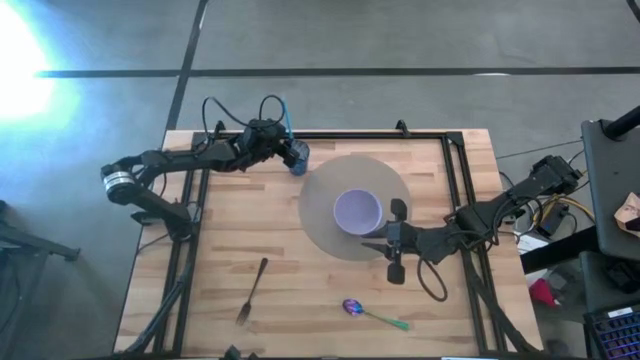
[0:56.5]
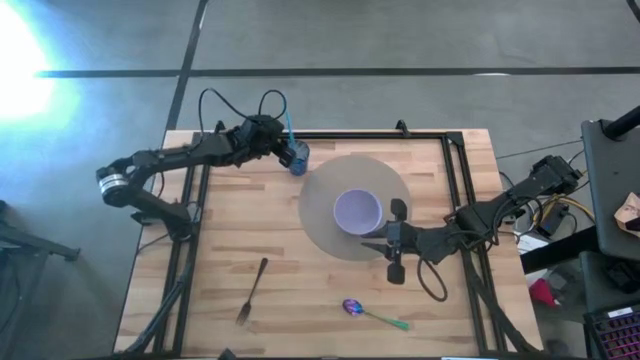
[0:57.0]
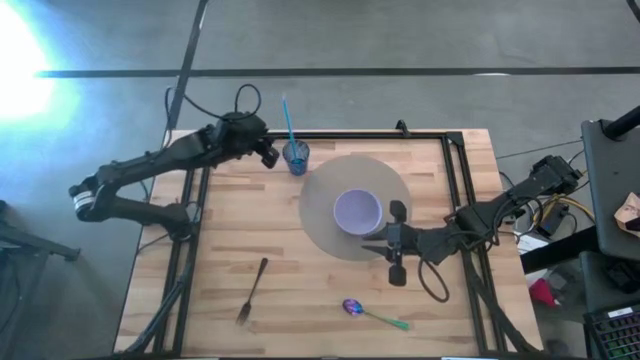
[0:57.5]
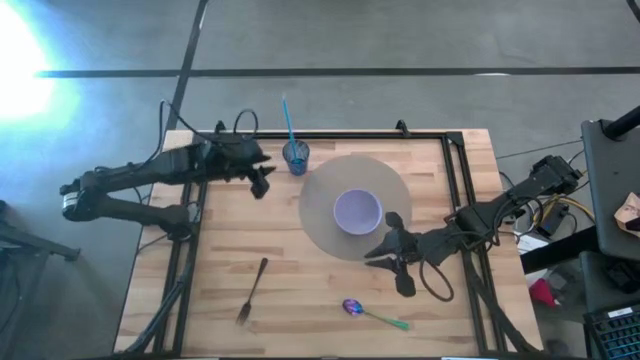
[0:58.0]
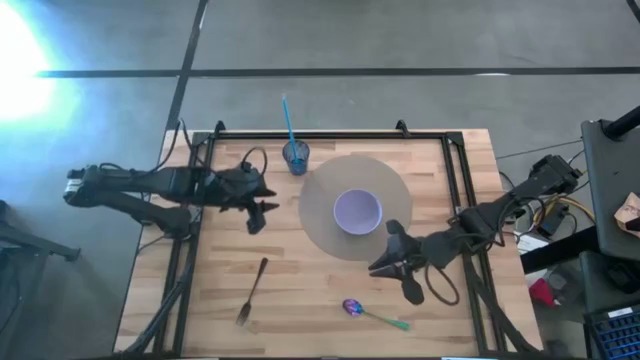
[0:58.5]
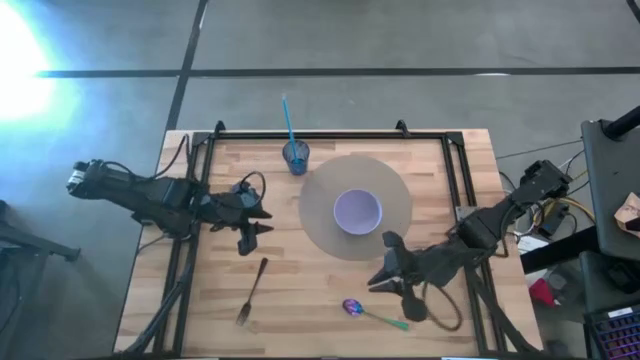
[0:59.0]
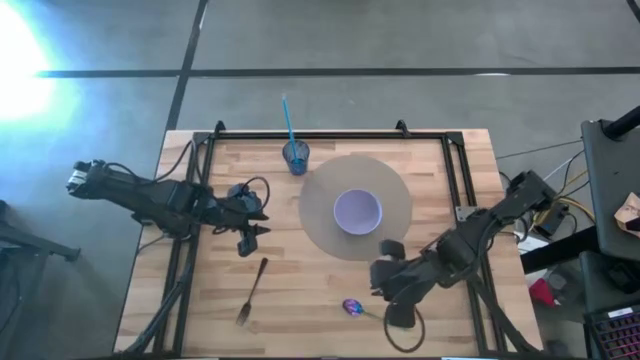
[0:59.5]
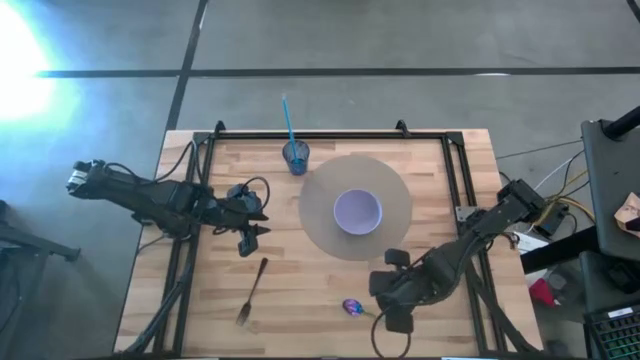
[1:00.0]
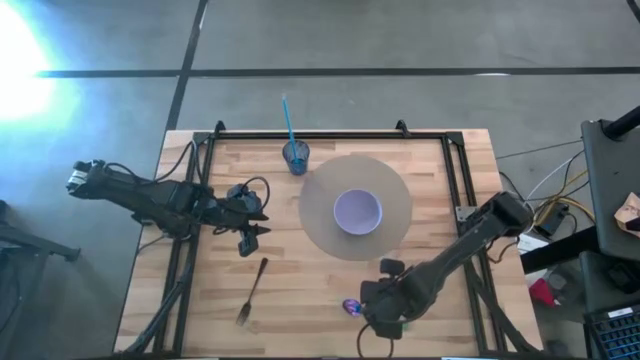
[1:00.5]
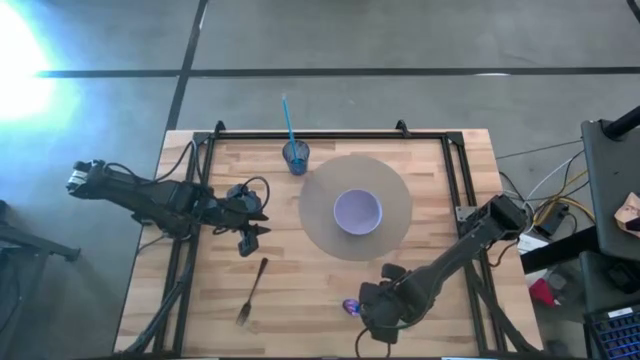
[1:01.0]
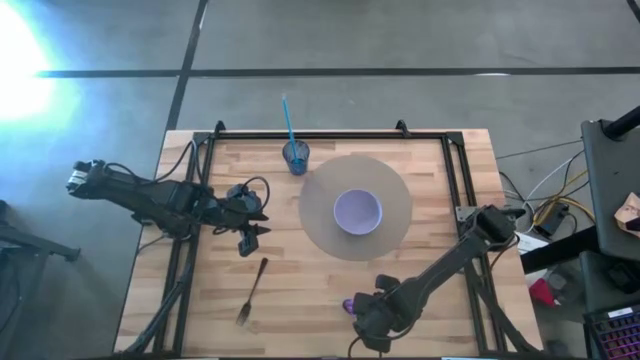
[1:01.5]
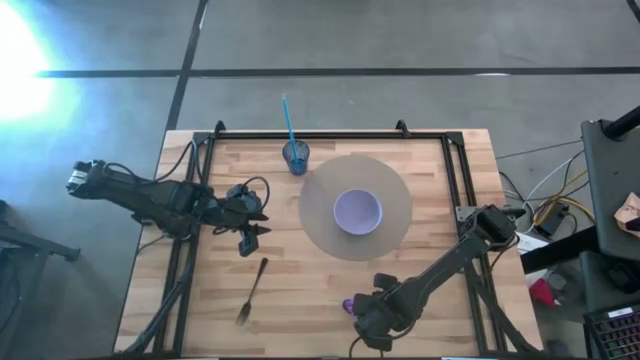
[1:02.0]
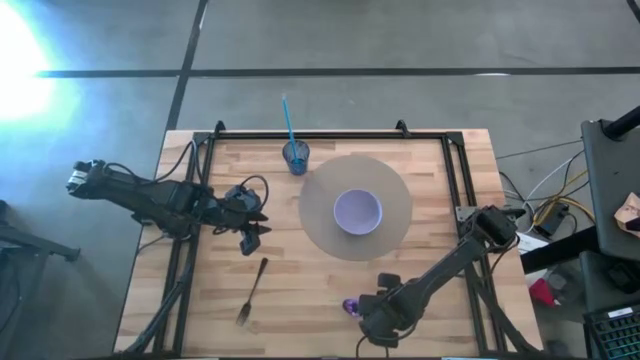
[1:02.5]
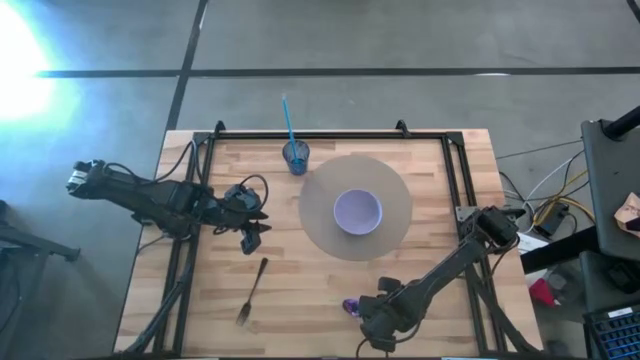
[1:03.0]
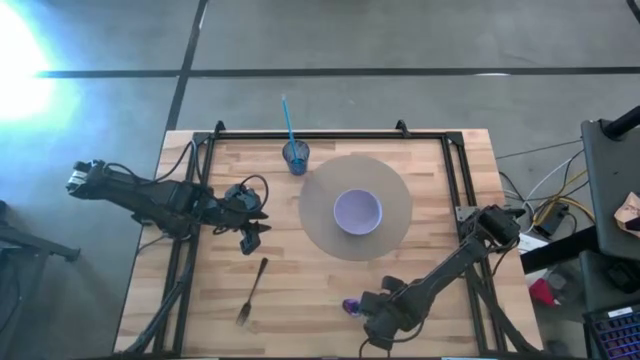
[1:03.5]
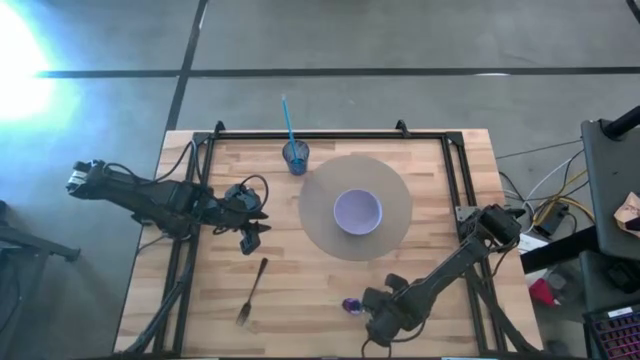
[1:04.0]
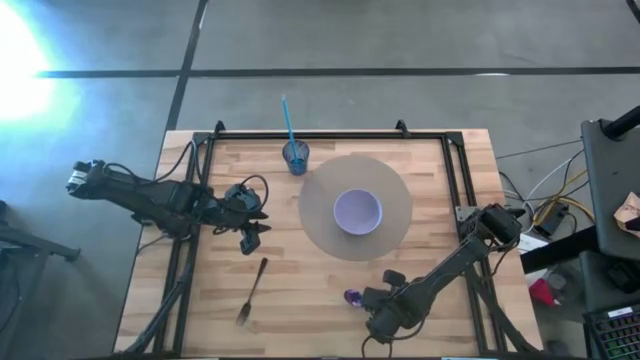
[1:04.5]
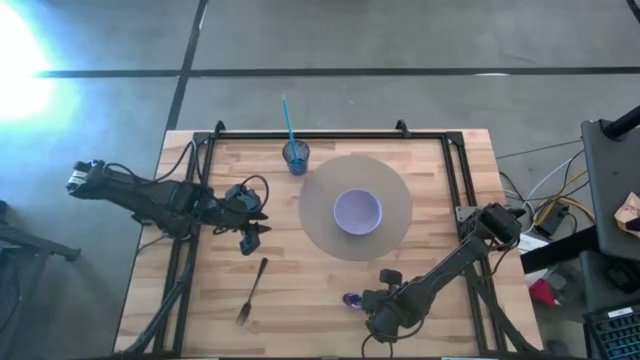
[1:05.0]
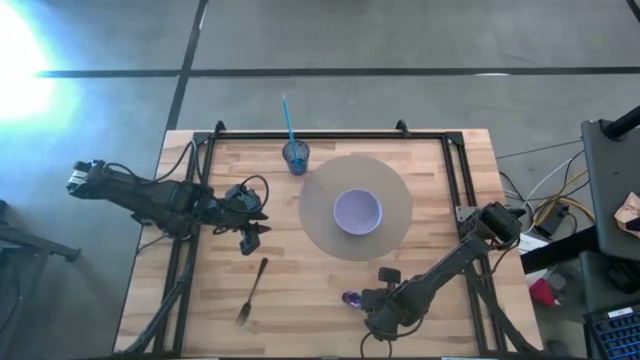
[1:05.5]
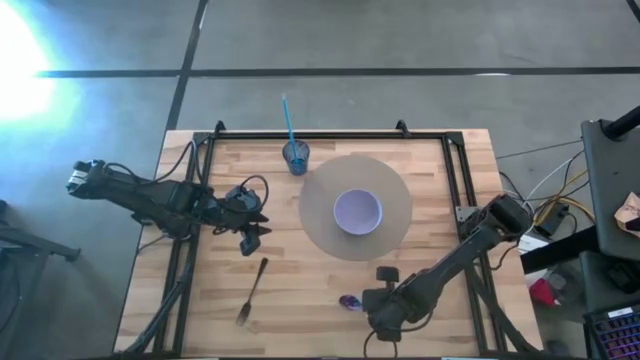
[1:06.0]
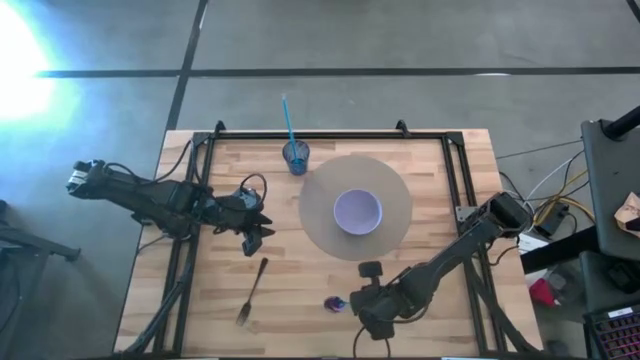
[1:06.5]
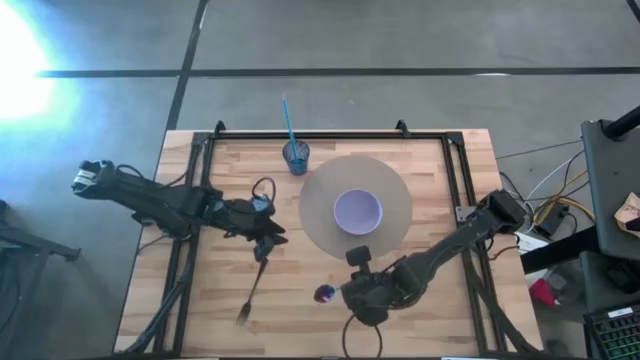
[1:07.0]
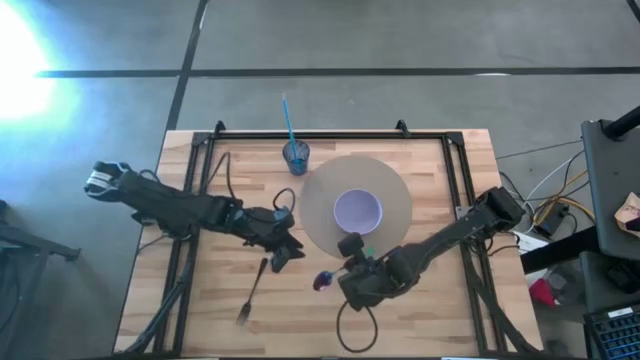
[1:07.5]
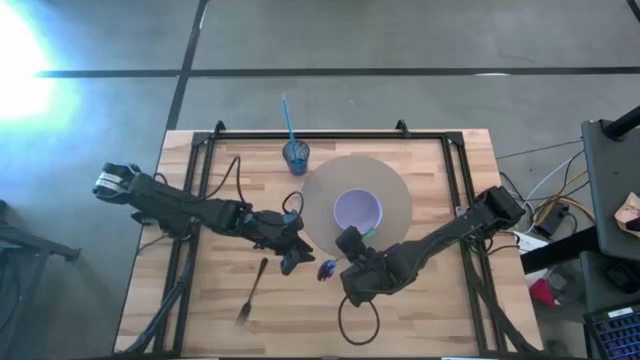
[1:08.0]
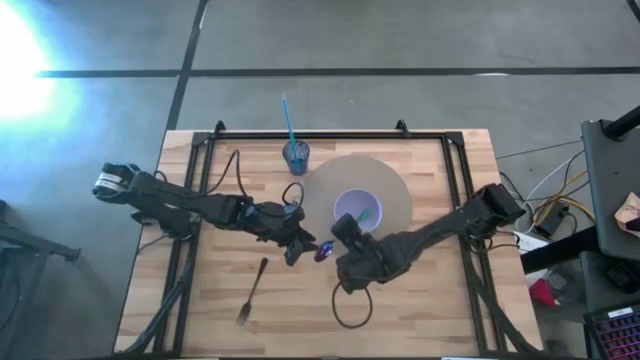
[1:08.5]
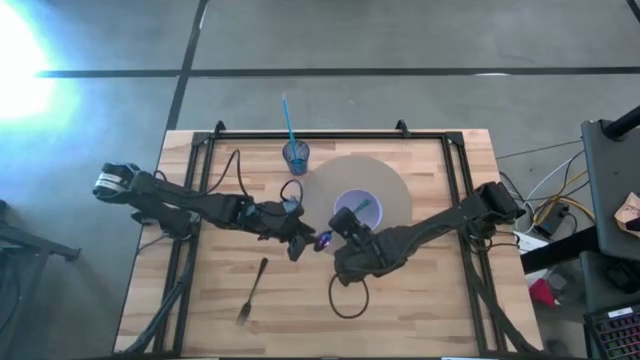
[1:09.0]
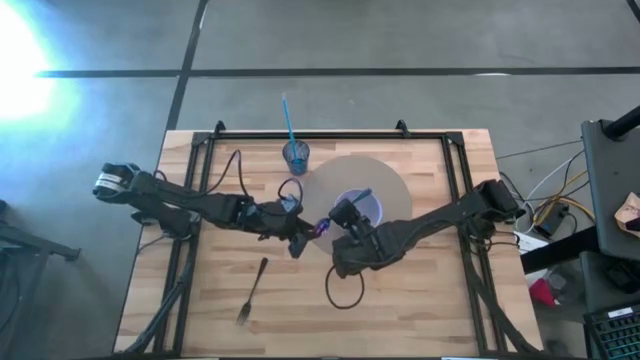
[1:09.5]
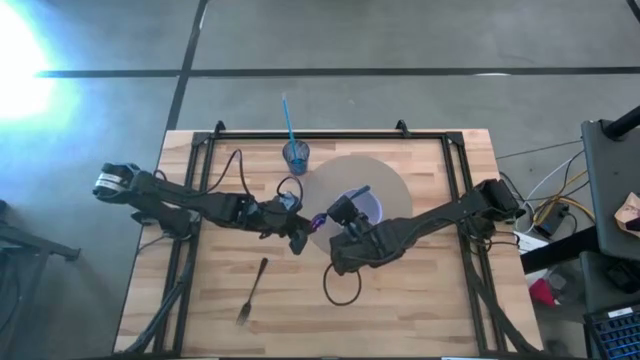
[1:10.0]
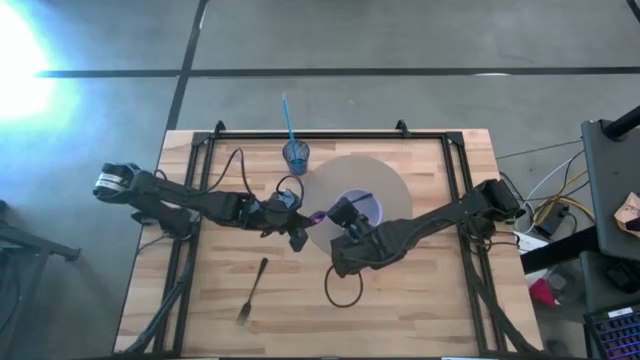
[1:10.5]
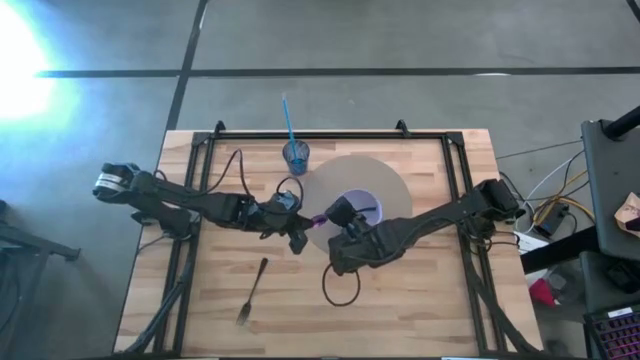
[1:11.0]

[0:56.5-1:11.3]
Task: Pick & Place Utensil
Put the blue spoon into the purple bowl

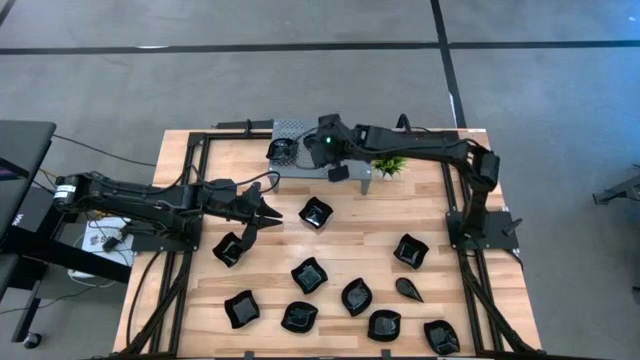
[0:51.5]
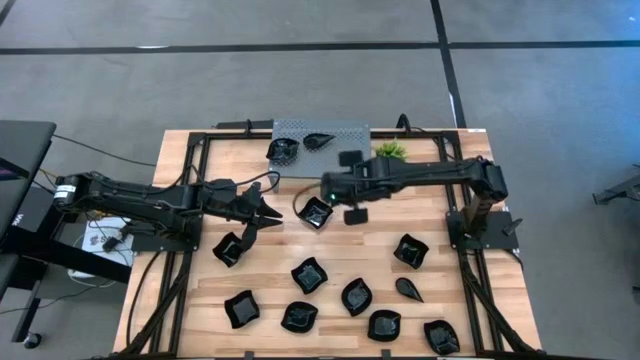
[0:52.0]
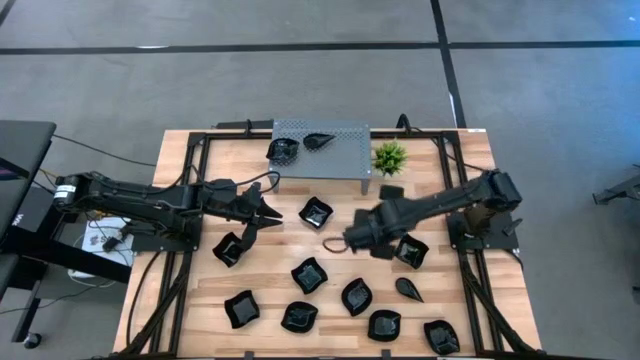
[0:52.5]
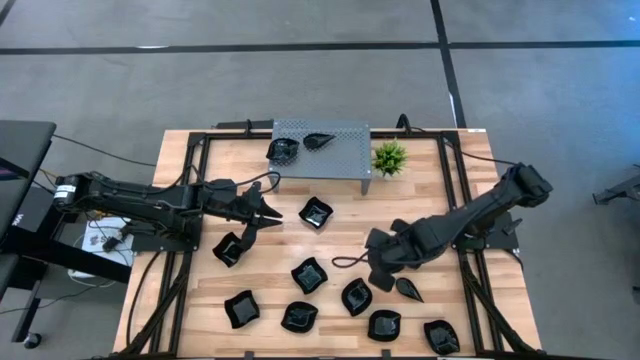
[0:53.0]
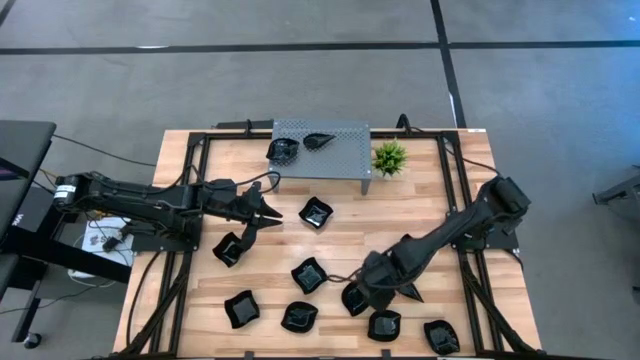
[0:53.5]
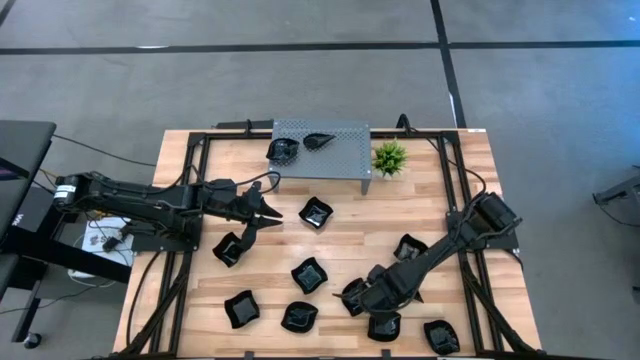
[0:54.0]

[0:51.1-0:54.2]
Task: Pick & Place Mini shaped plates
Stack the drop-shaped plate on top of the drop-shaped plate on the shelf

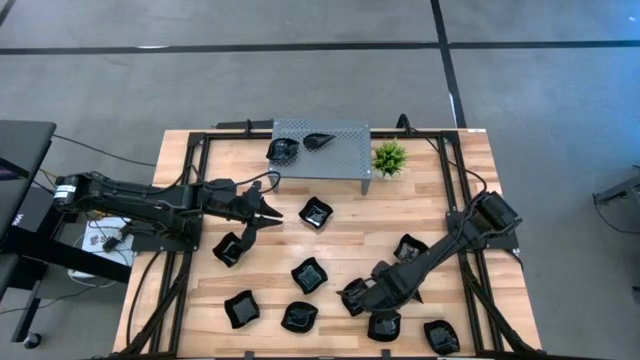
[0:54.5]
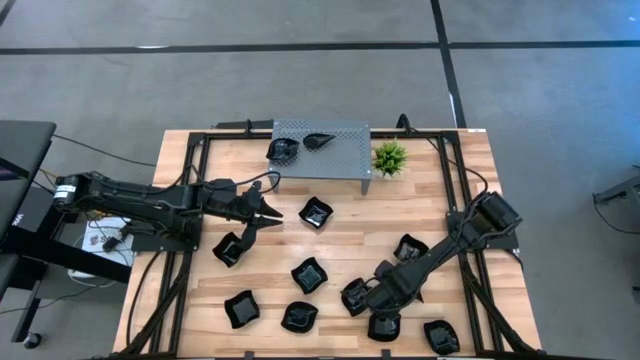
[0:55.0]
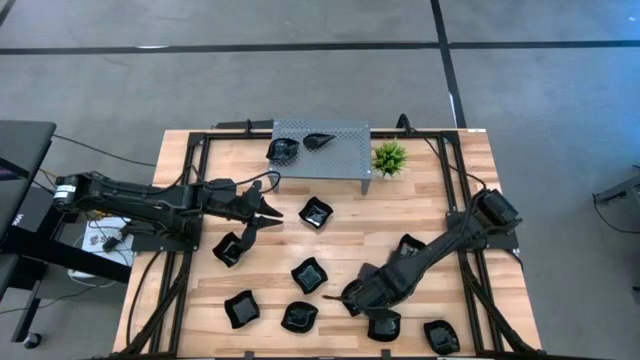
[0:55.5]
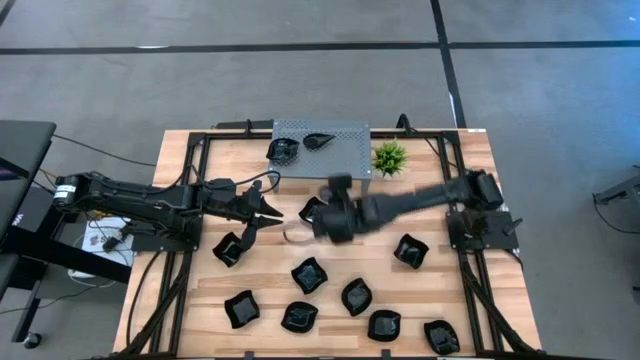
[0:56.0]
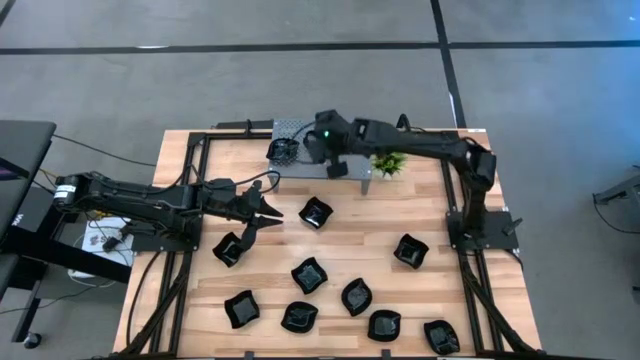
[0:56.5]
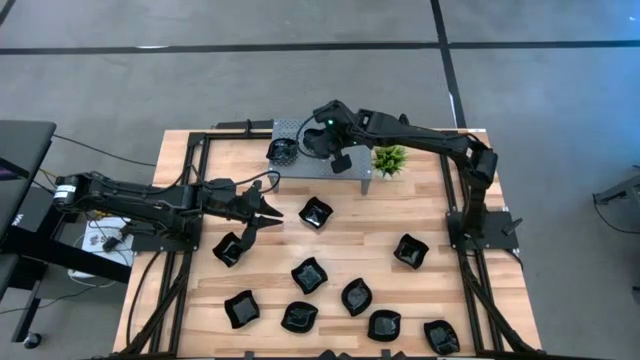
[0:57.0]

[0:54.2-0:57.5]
Stack the drop-shaped plate on top of the drop-shaped plate on the shelf
